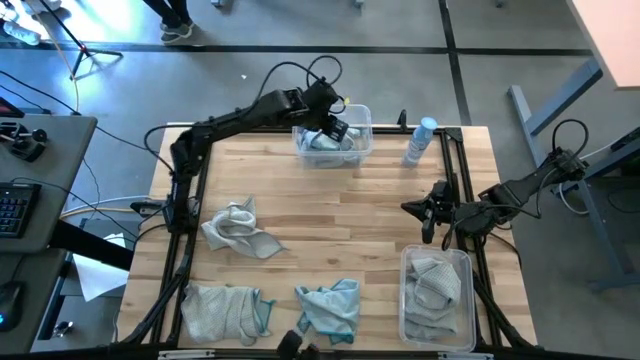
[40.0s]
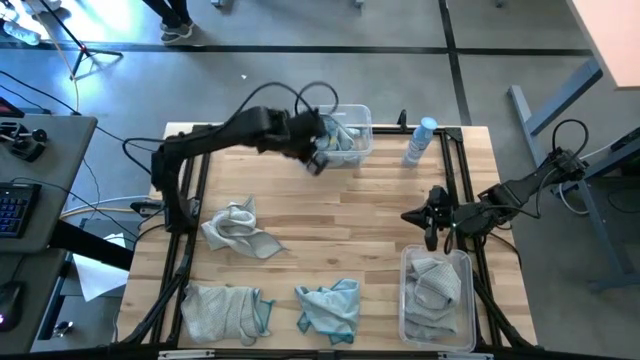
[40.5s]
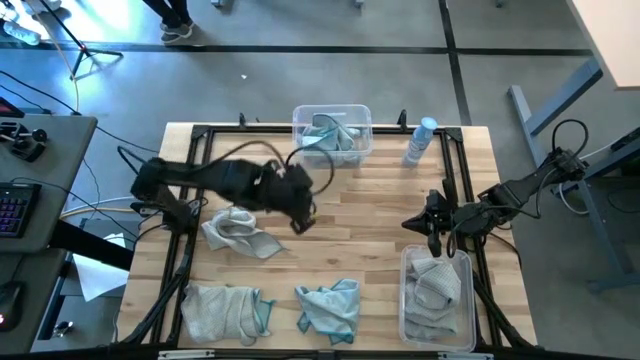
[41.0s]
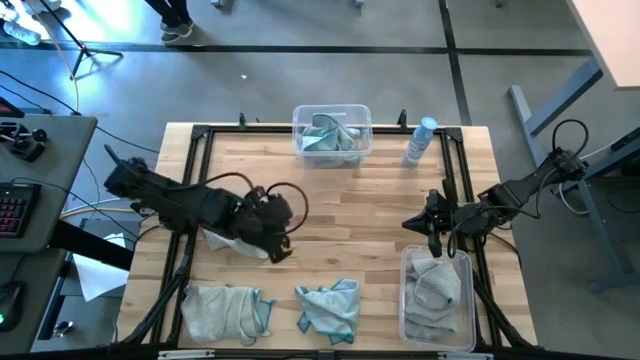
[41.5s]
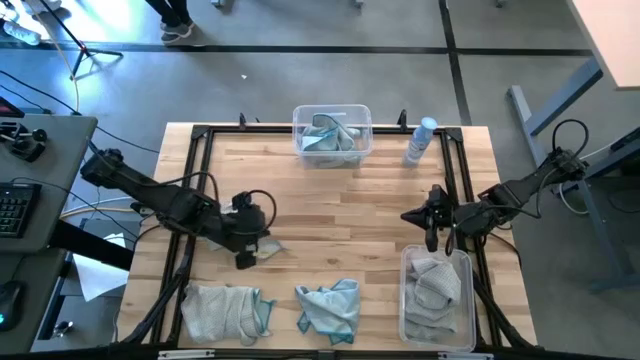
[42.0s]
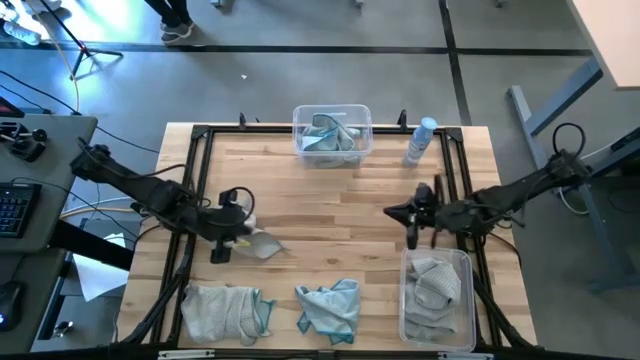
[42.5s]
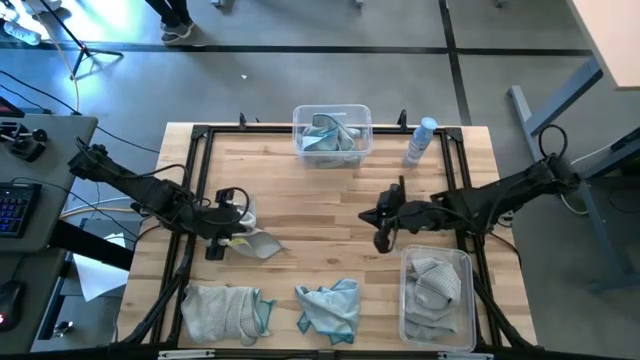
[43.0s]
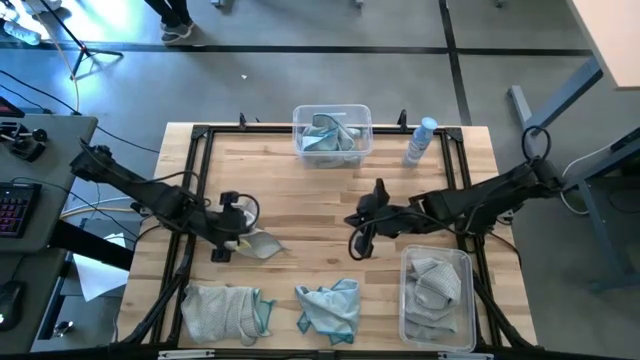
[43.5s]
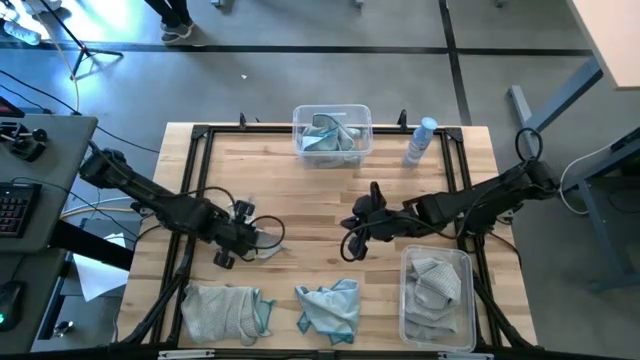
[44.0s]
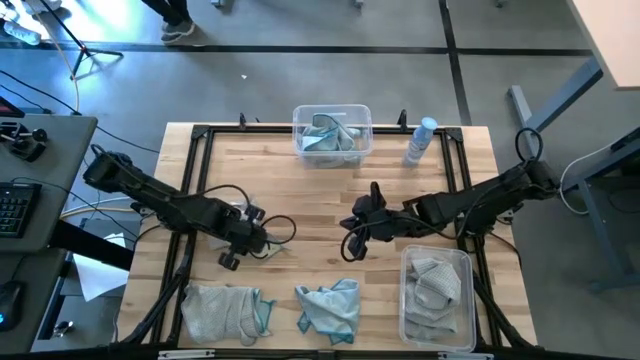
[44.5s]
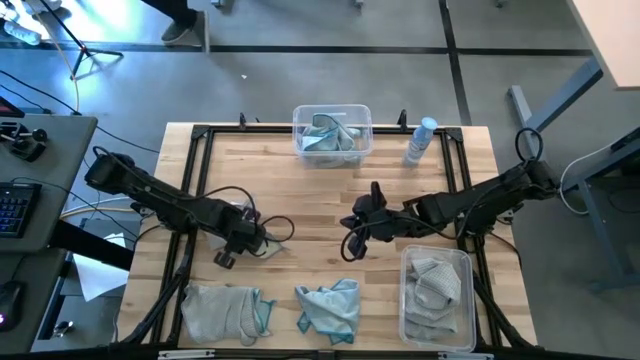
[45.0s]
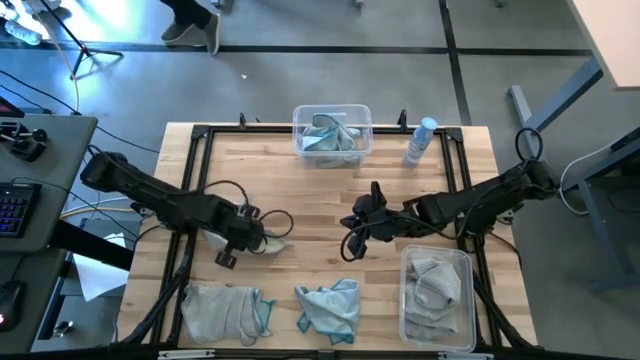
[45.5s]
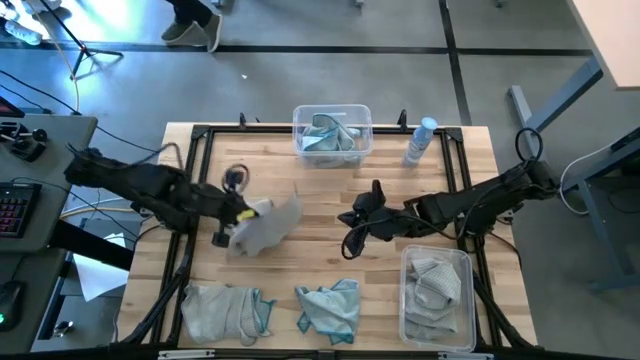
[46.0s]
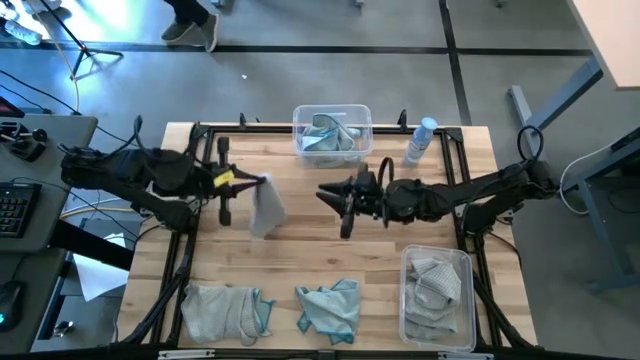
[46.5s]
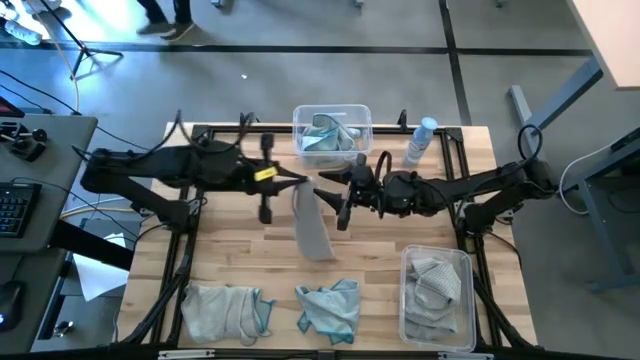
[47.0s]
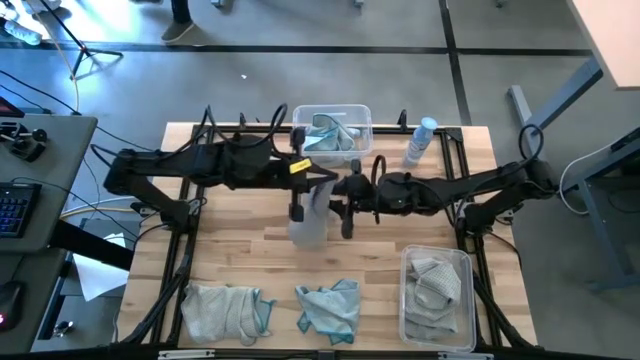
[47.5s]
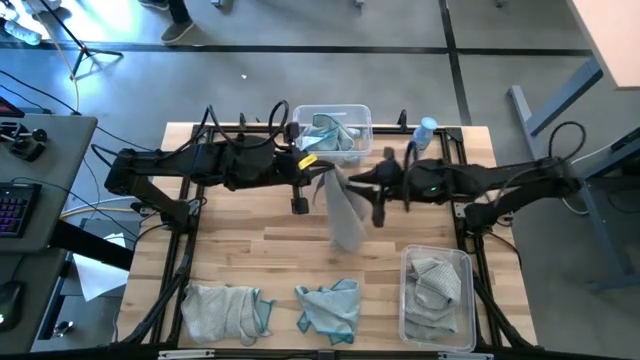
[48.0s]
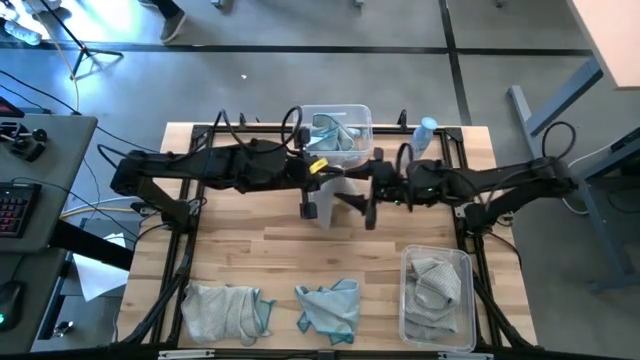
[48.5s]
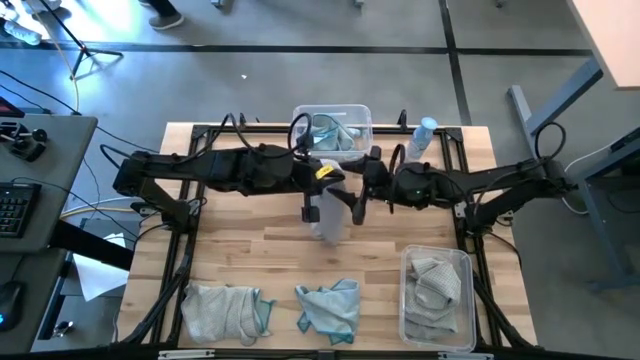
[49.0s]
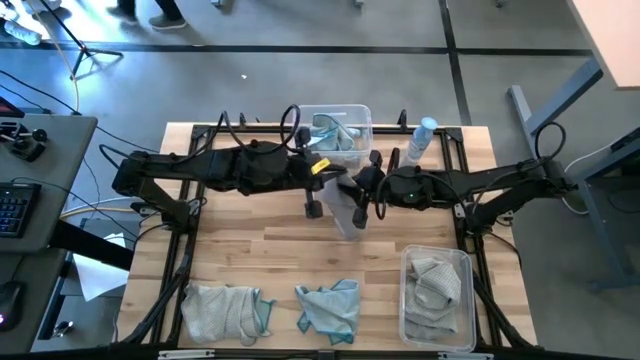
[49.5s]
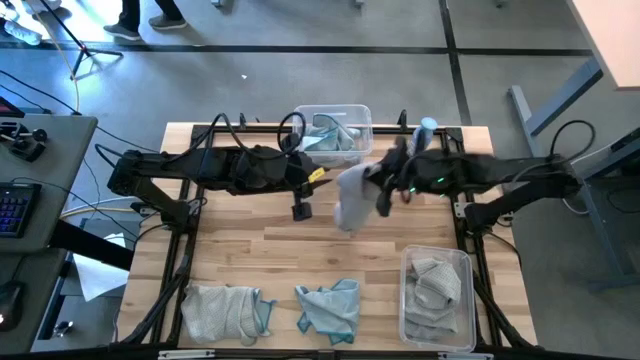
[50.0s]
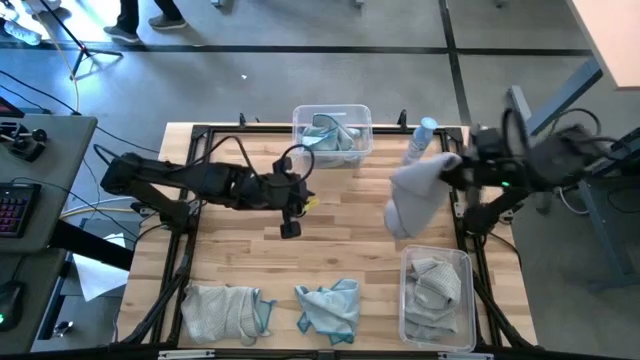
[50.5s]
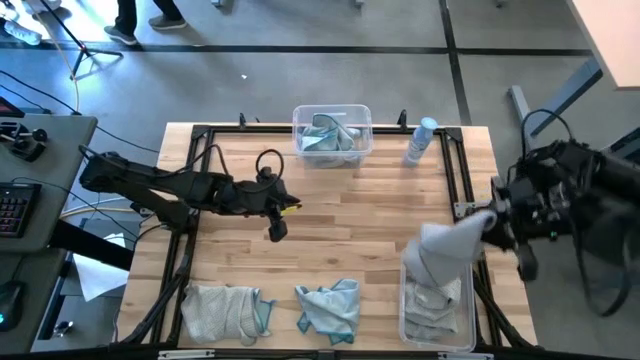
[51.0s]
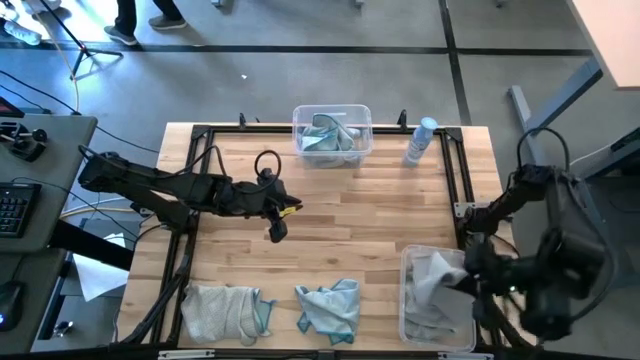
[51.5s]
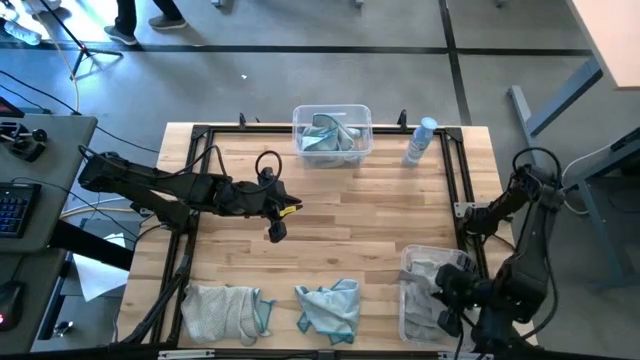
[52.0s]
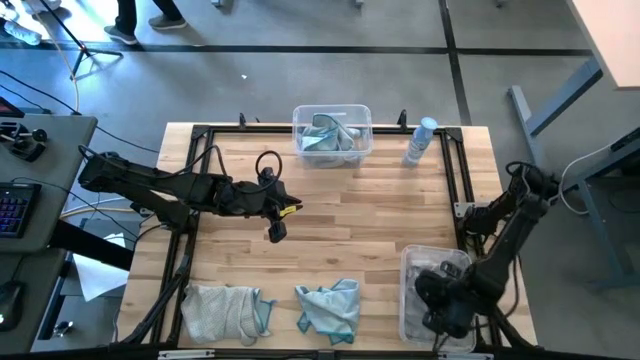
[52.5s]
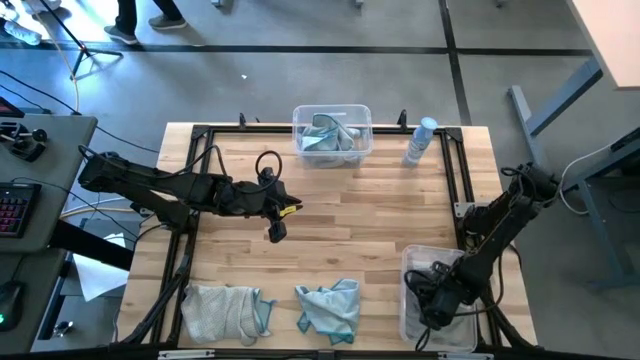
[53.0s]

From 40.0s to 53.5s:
Task: Sort microfiber towel by color & place in baskets
Put the gray microfiber towel into the bottom transparent bin

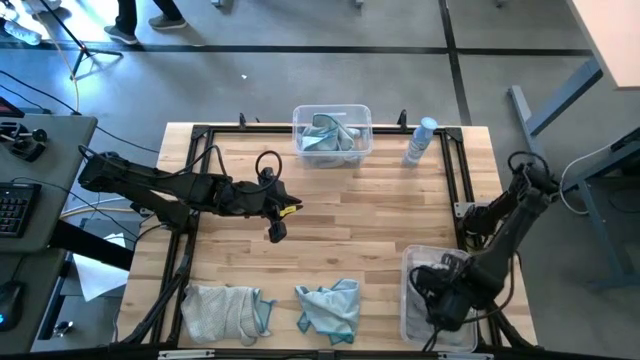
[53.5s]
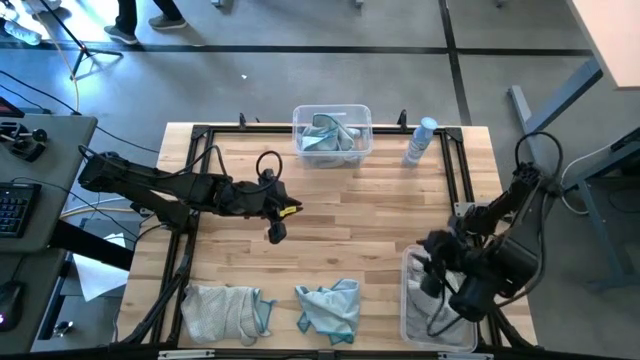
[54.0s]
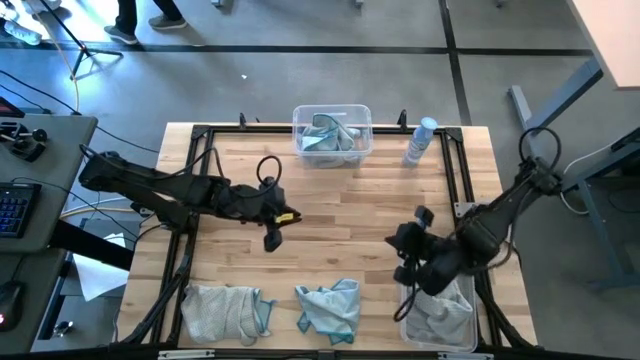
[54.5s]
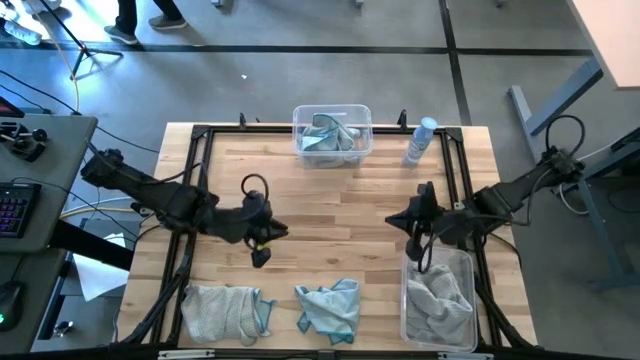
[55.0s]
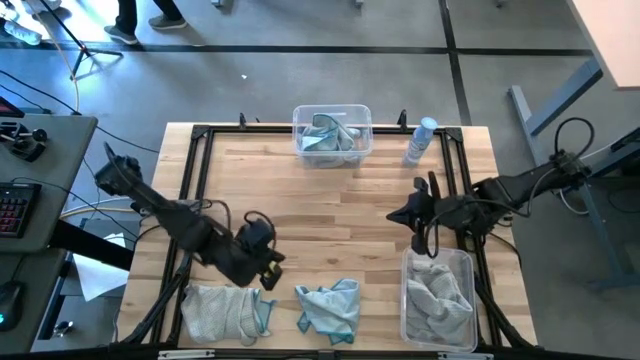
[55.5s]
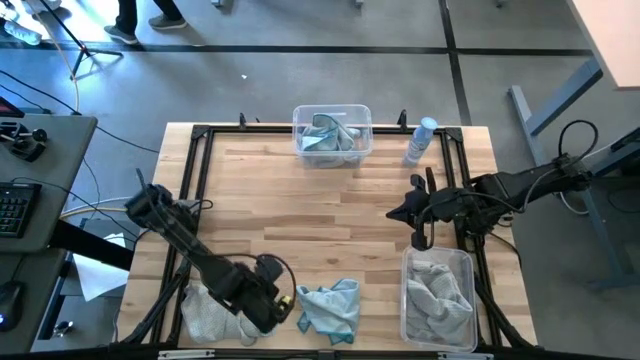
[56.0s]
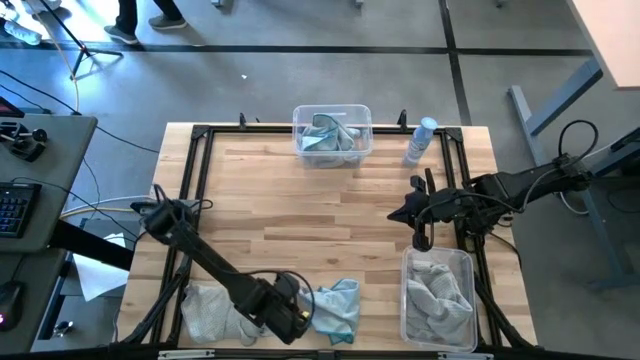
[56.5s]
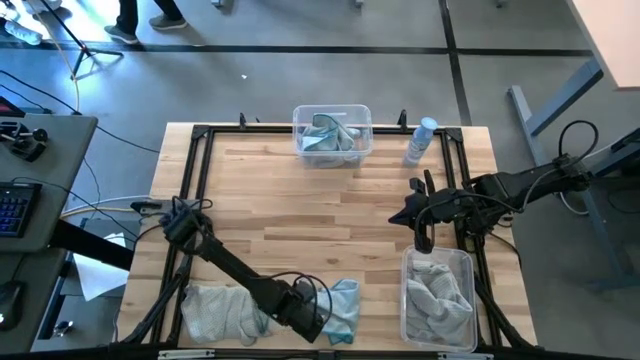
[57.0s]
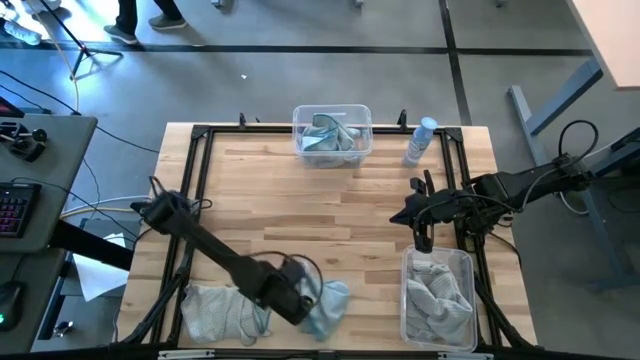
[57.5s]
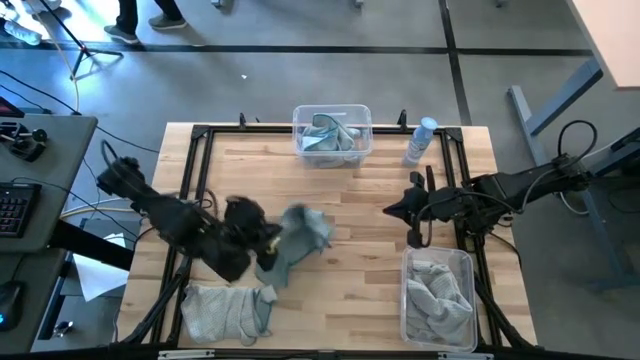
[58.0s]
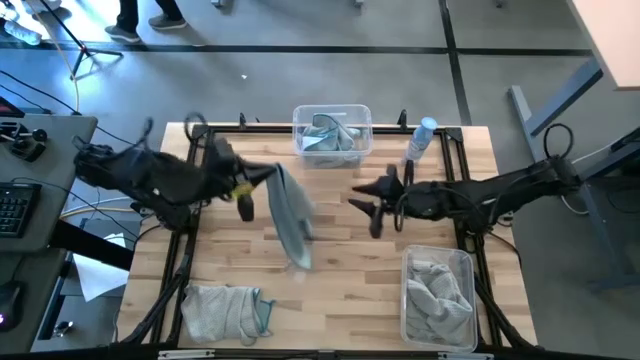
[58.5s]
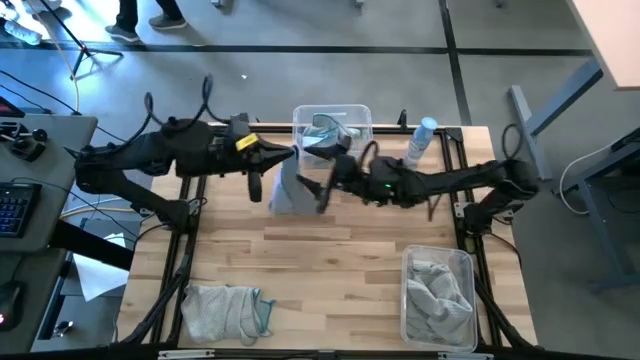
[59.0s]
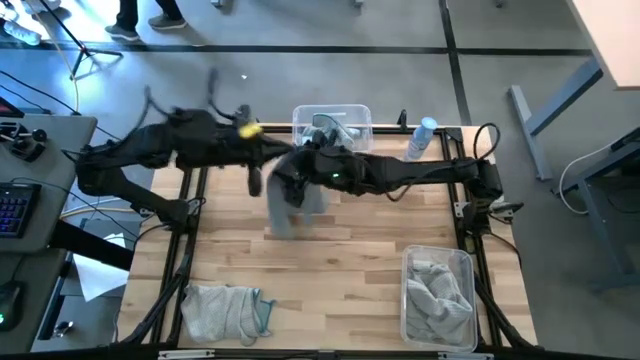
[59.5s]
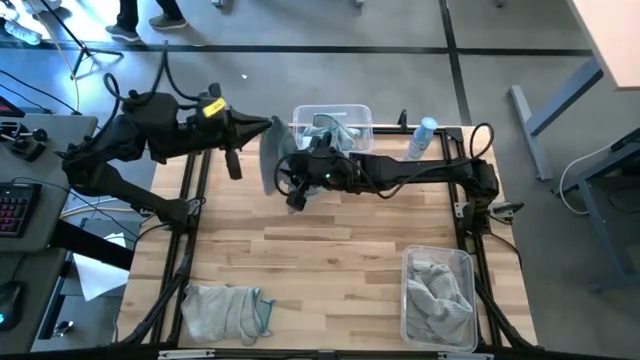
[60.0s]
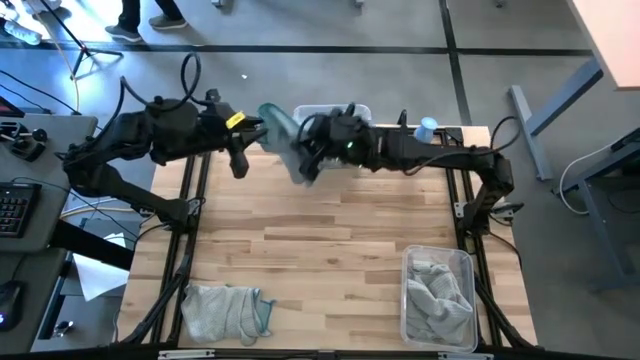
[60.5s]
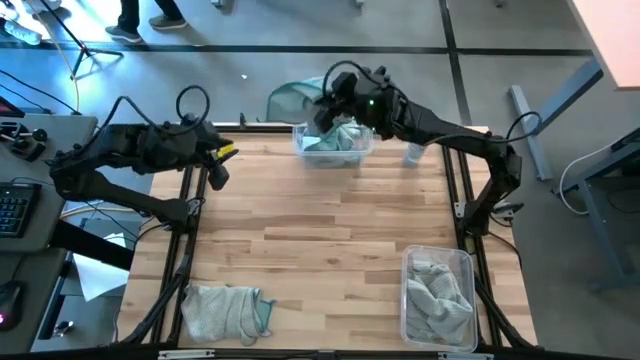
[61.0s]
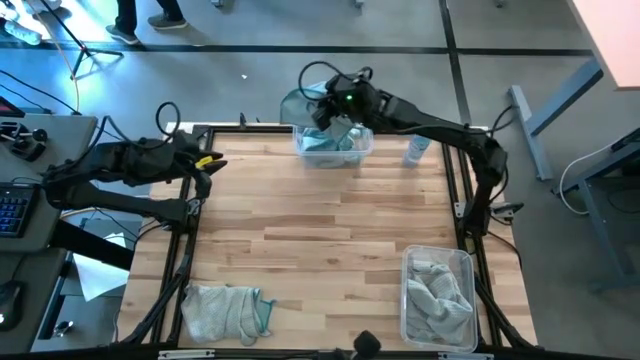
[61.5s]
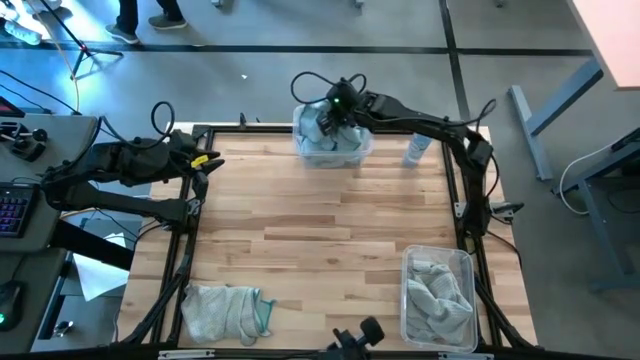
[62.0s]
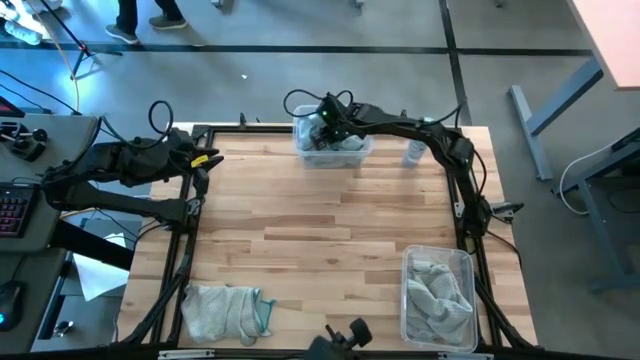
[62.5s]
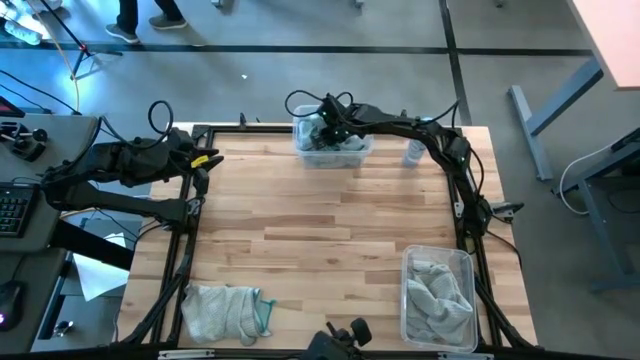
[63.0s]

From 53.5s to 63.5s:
Put the blue microfiber towel into the top transparent bin
